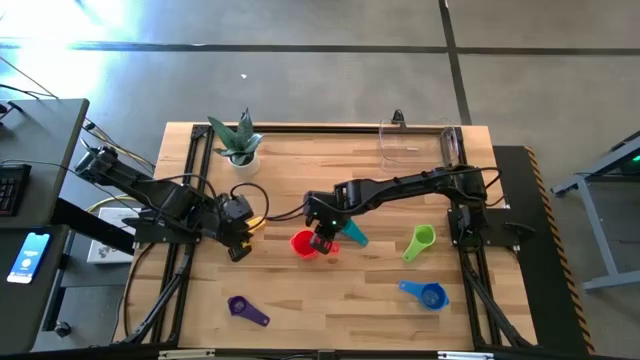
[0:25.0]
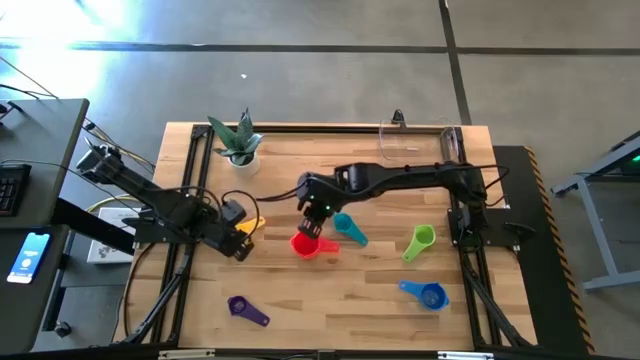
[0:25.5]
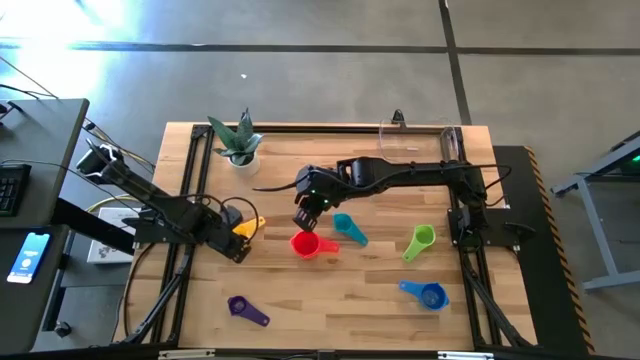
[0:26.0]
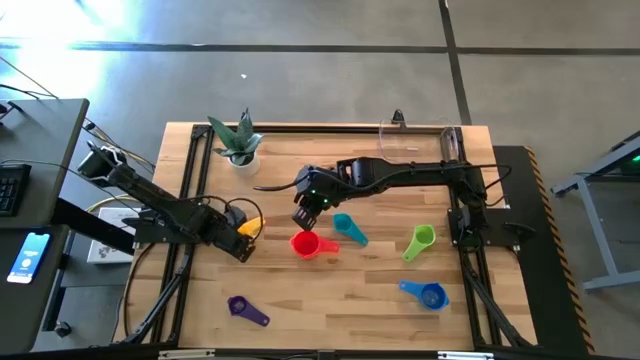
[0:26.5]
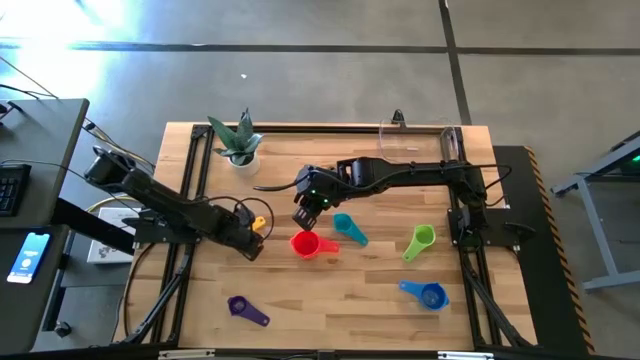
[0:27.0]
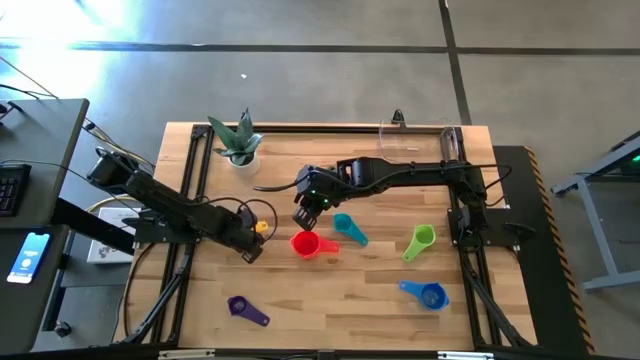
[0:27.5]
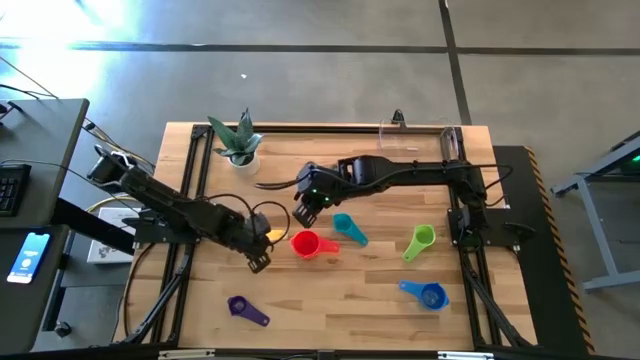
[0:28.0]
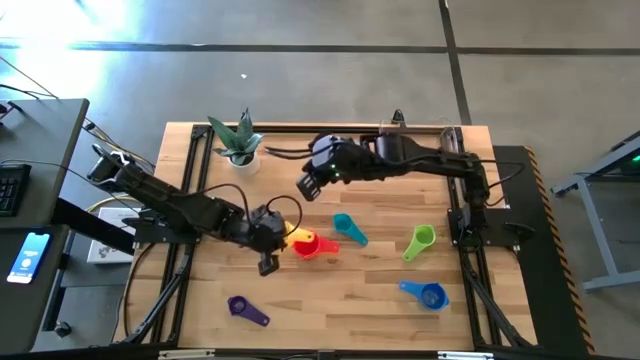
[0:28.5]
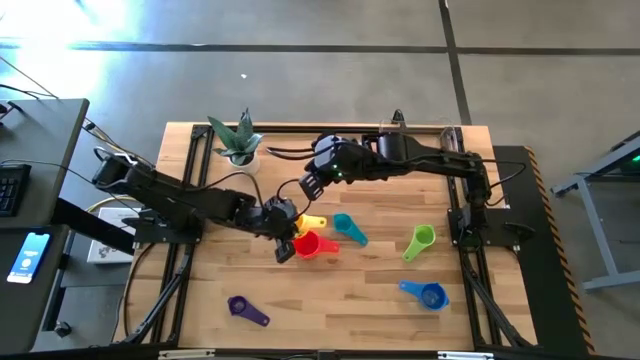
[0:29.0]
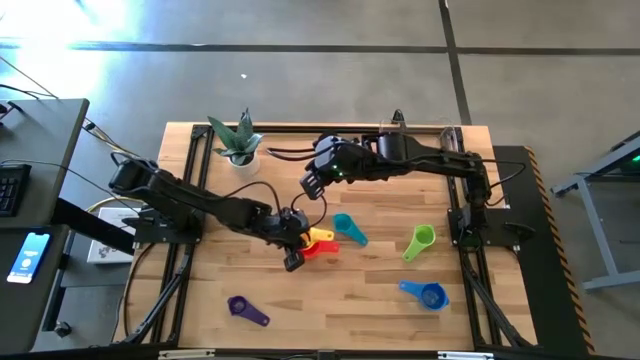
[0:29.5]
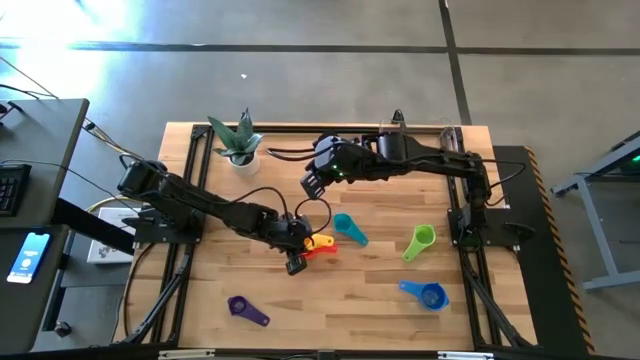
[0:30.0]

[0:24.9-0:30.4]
Task: Nest measuring cups in basket
Stack the yellow measuring cup on top of the red measuring cup

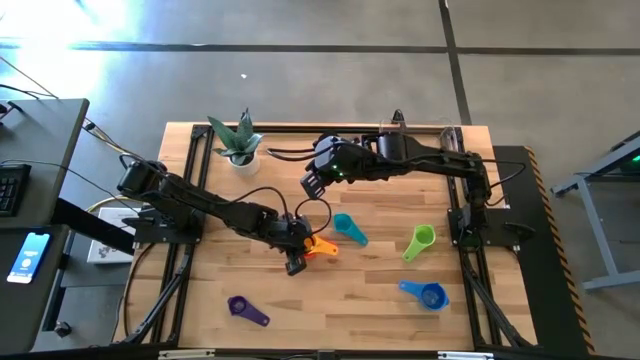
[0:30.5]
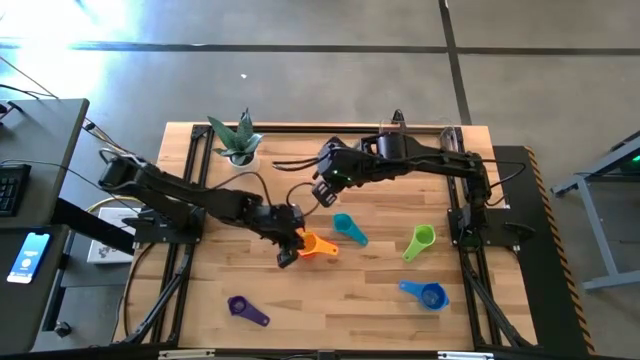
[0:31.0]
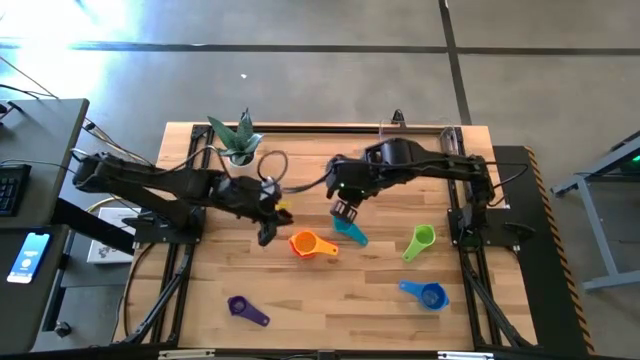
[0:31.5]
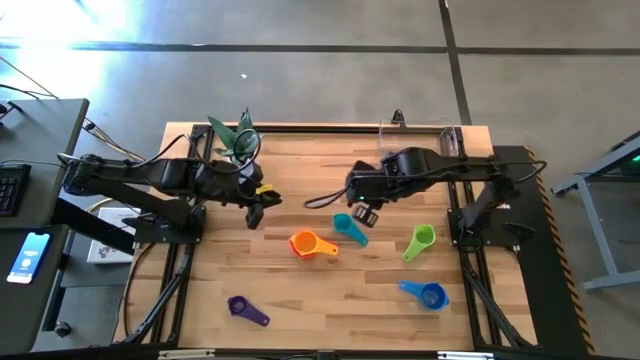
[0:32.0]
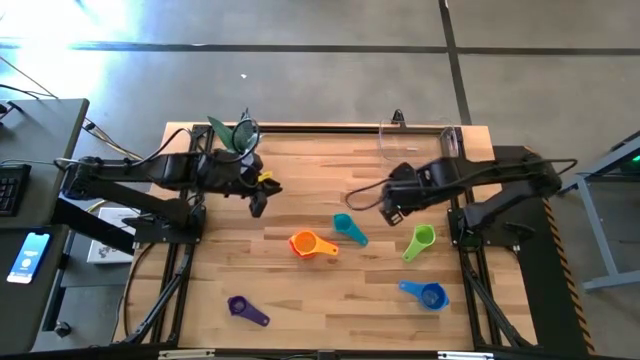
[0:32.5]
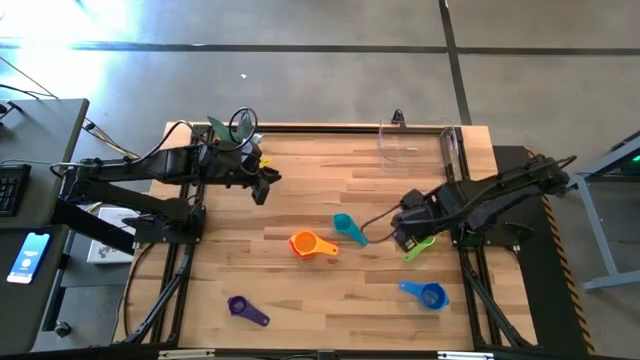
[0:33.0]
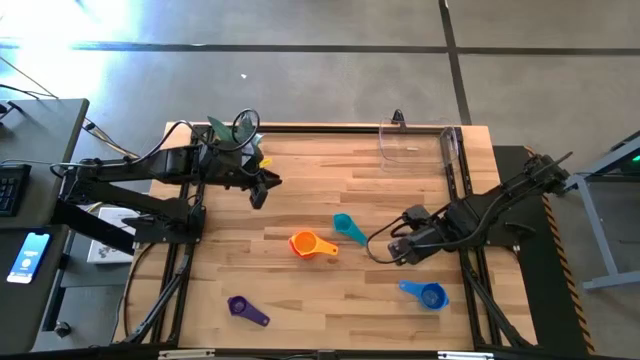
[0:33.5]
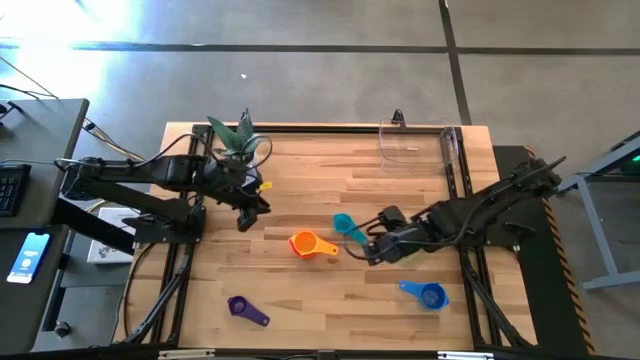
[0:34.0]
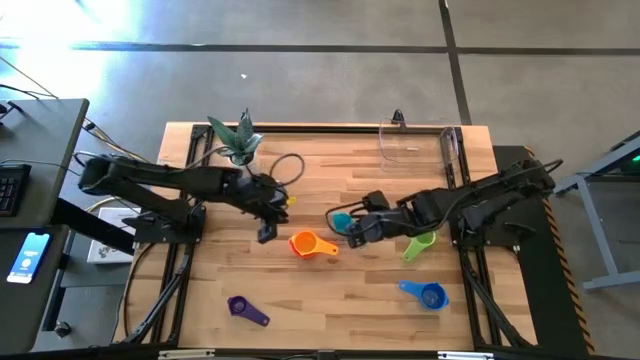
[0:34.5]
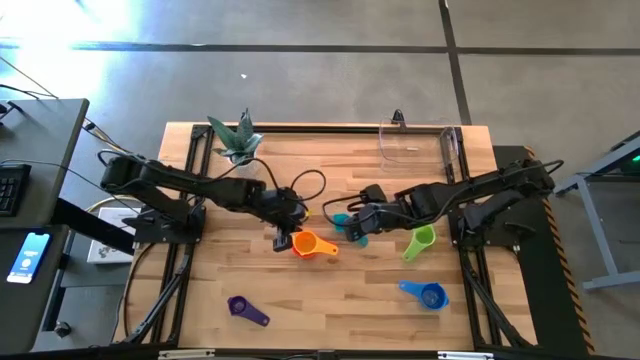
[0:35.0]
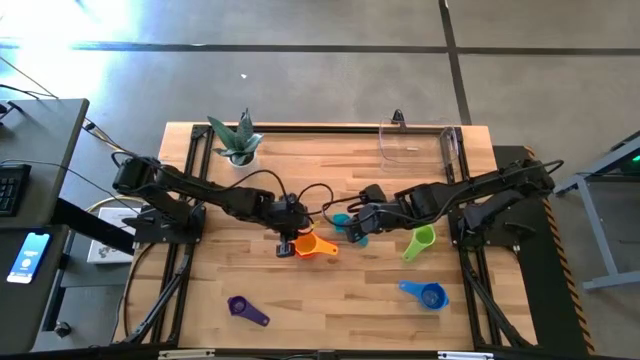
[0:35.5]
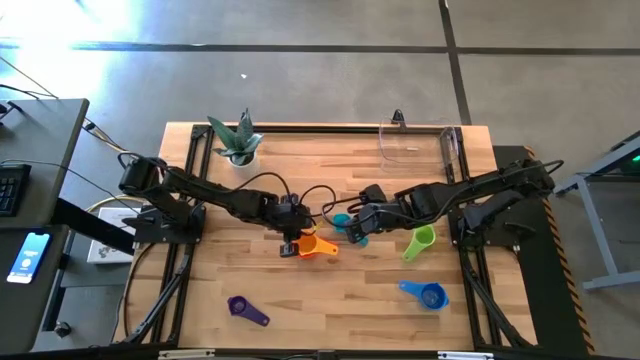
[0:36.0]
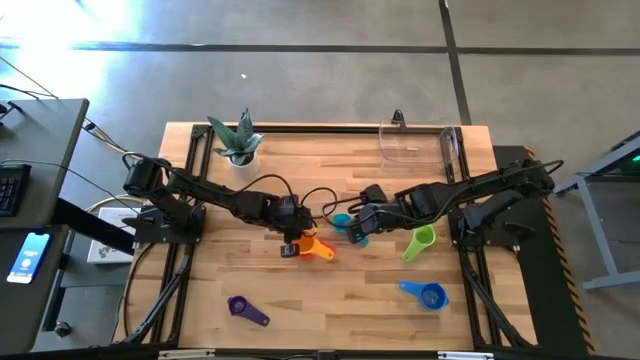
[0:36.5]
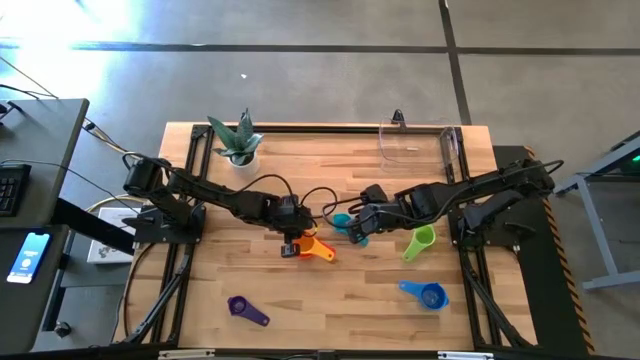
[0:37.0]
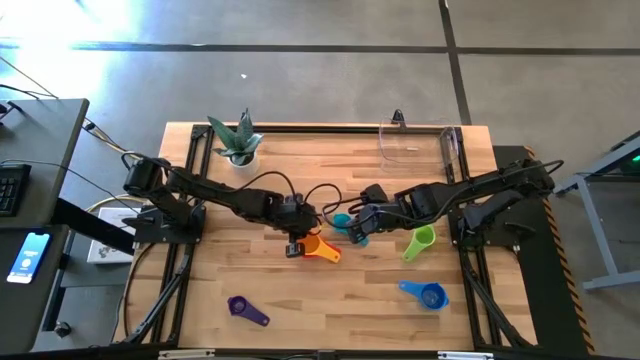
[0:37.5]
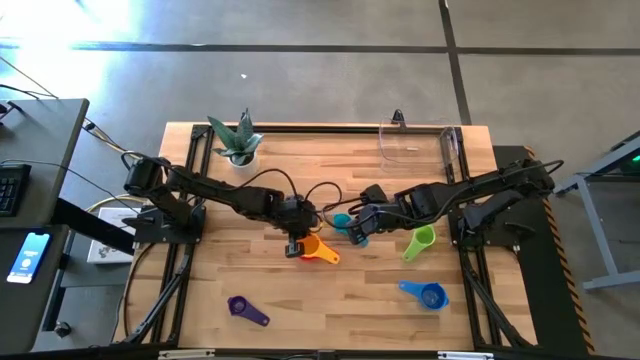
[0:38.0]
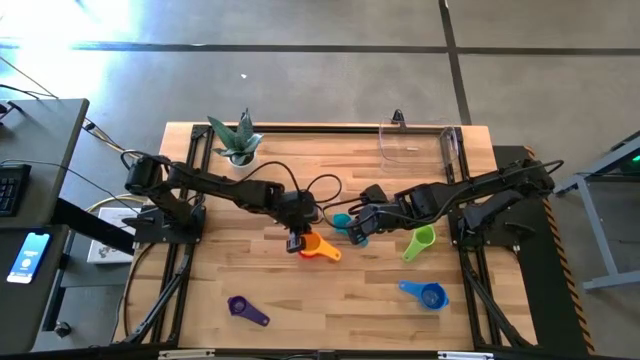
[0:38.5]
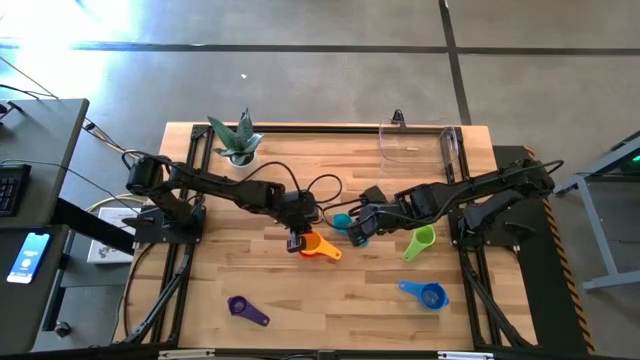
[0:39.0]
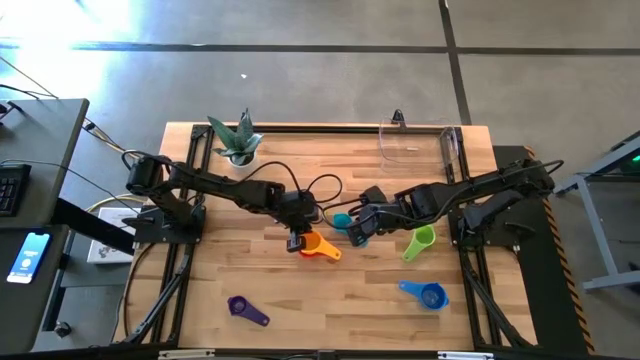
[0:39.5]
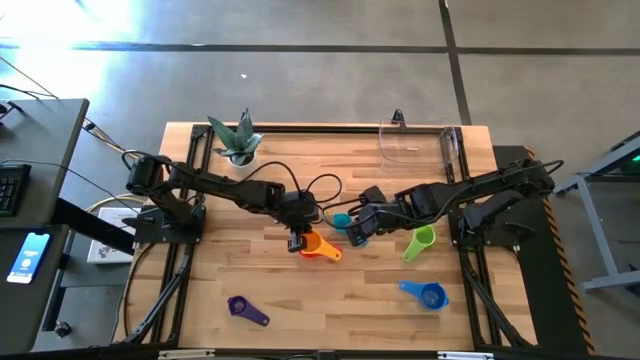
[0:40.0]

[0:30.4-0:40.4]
Remove the yellow measuring cup from the stacked measuring cups

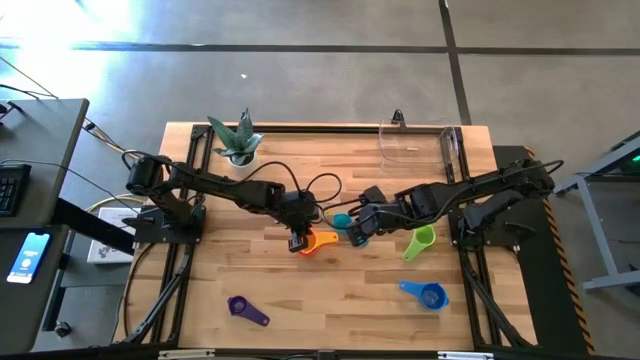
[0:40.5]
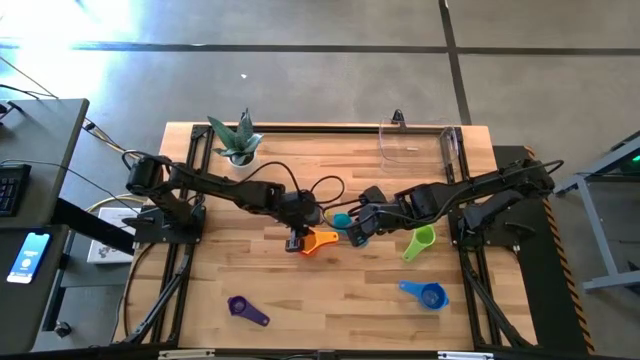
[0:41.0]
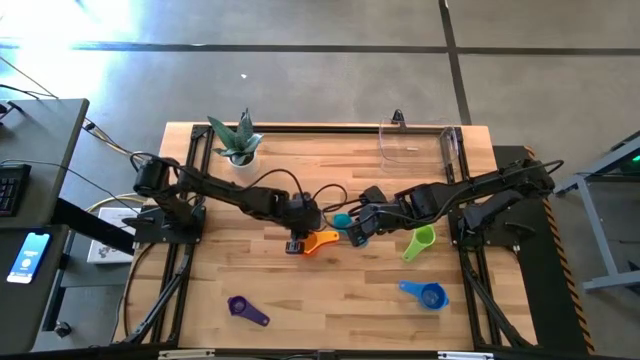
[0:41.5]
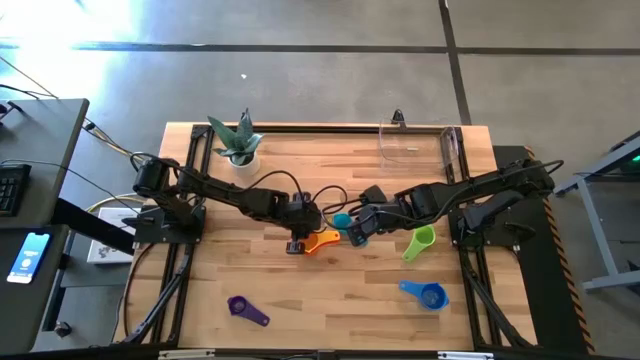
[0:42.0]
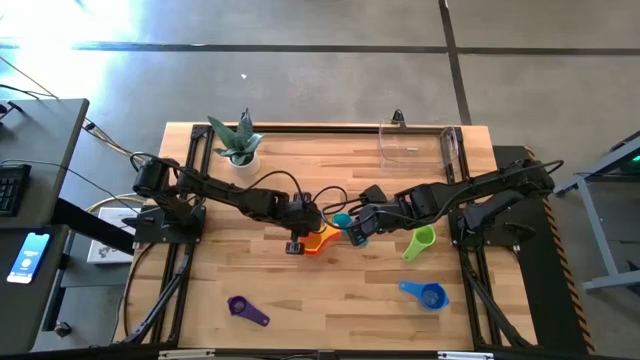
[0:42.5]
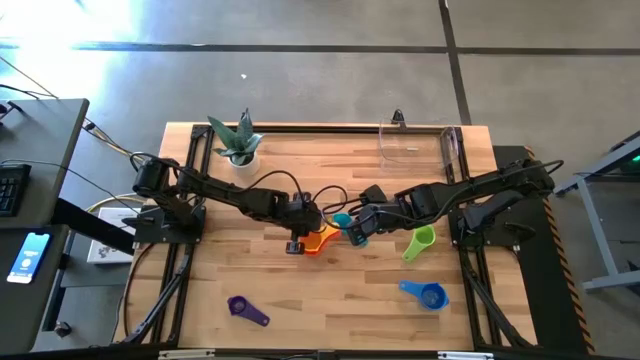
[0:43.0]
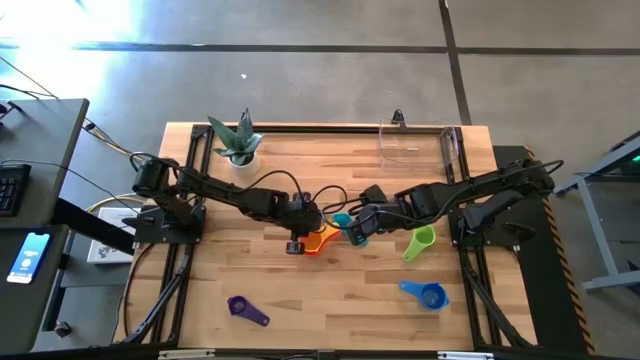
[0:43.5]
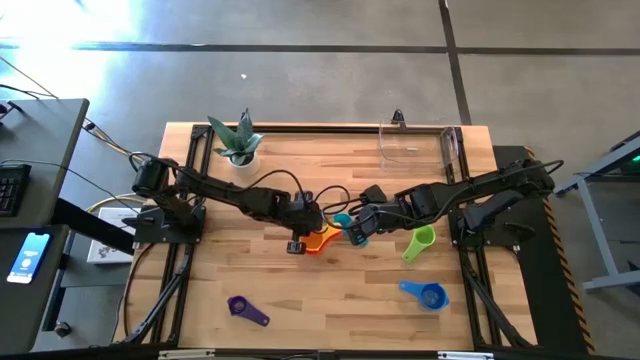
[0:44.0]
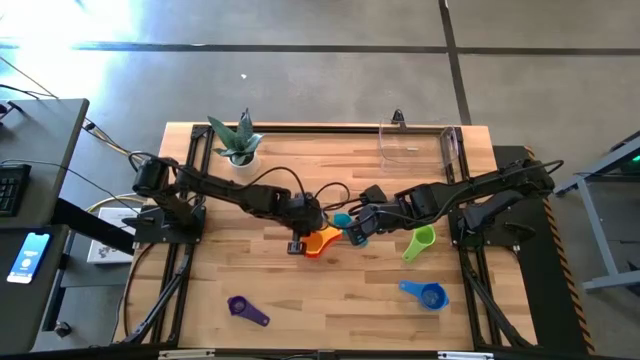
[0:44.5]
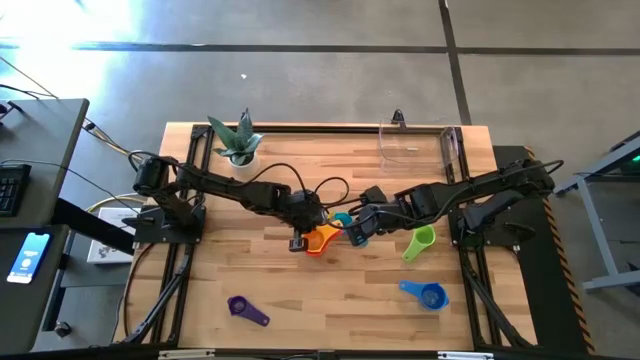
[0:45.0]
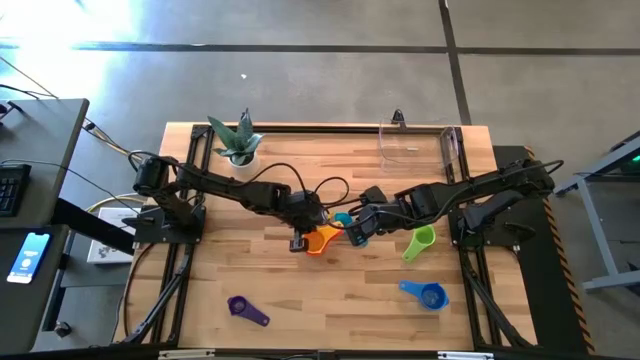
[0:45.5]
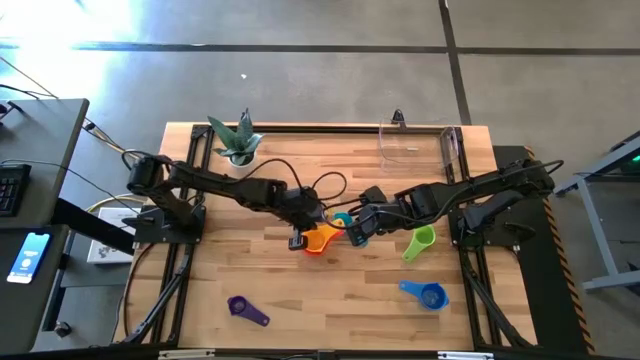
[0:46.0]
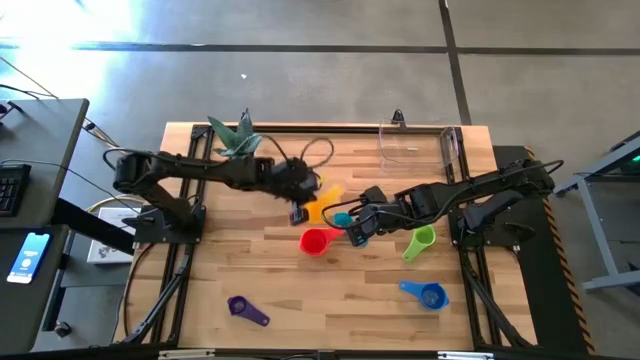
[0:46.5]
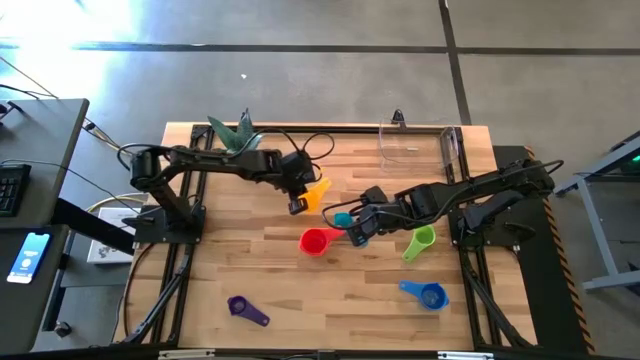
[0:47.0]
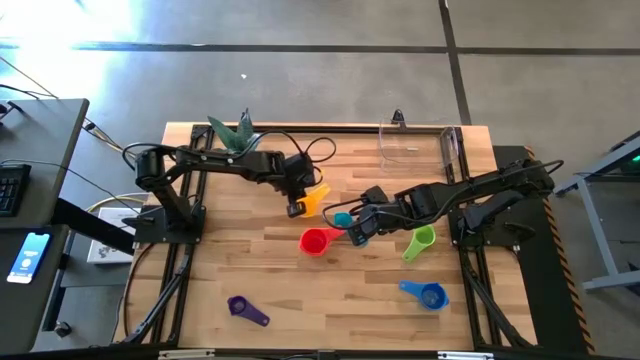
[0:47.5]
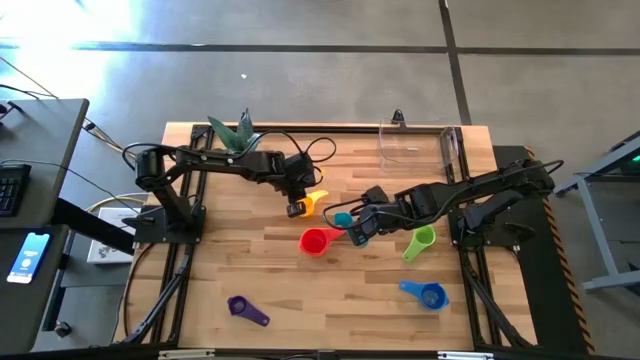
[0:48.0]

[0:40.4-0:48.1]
Remove the yellow measuring cup from the stacked measuring cups
